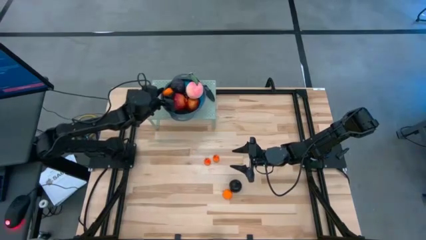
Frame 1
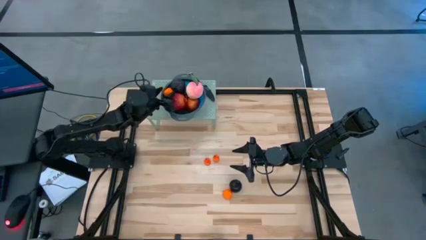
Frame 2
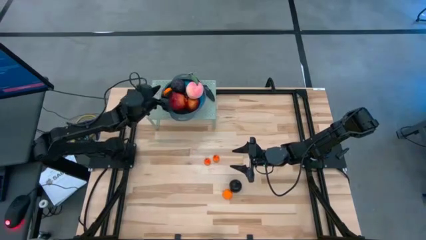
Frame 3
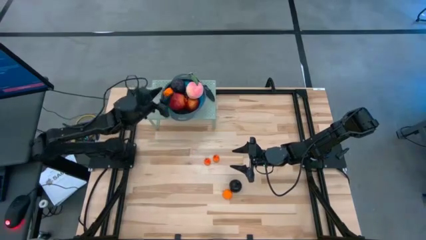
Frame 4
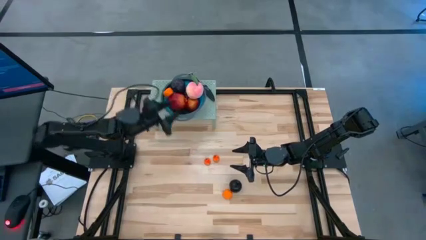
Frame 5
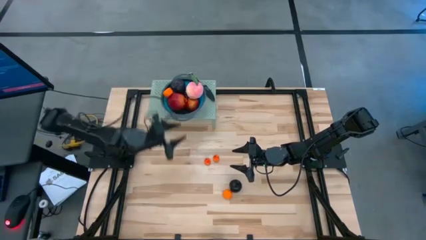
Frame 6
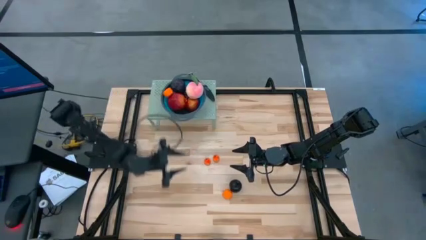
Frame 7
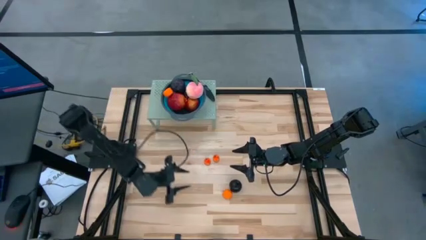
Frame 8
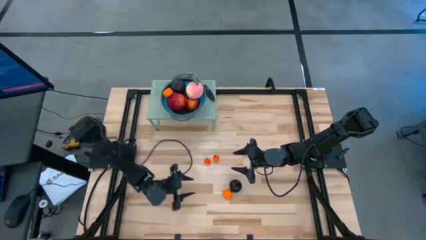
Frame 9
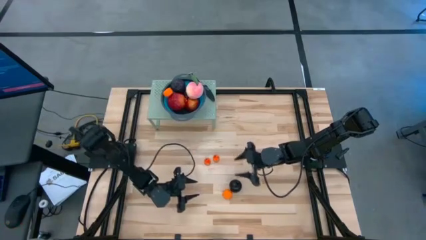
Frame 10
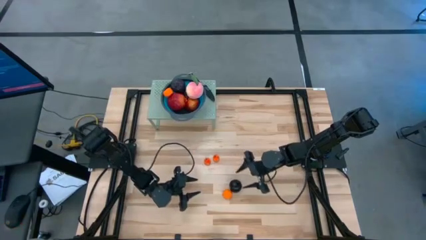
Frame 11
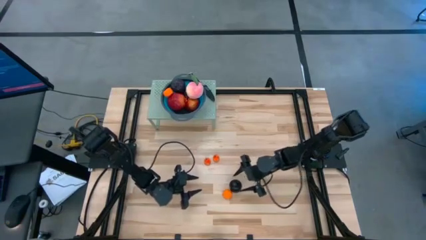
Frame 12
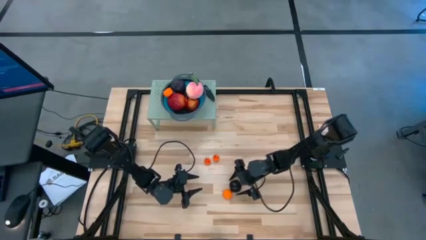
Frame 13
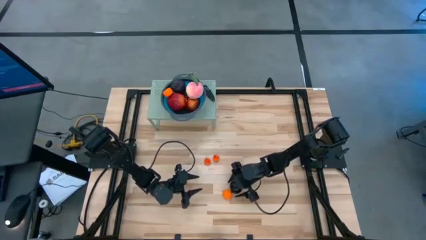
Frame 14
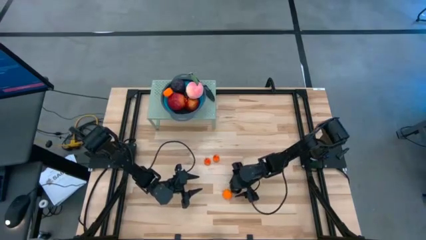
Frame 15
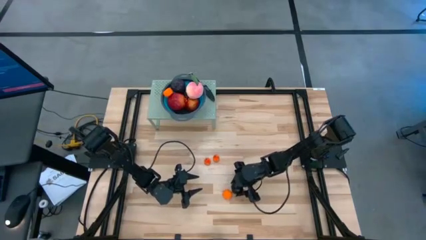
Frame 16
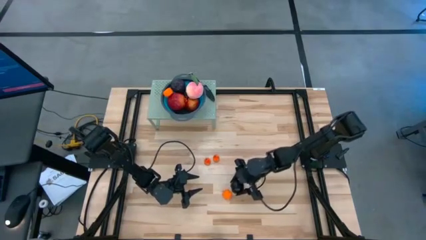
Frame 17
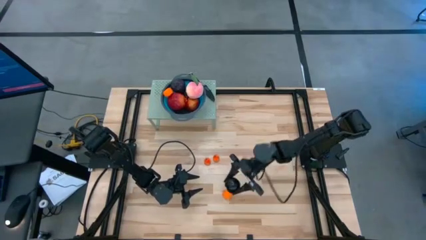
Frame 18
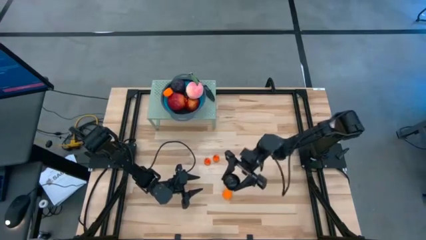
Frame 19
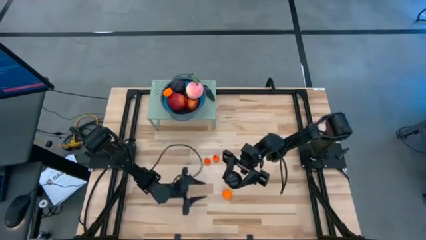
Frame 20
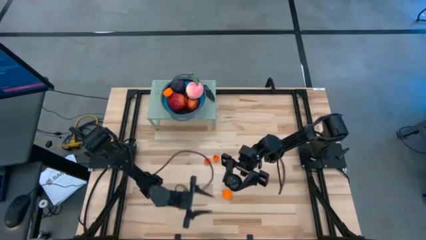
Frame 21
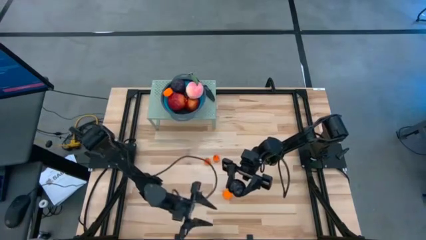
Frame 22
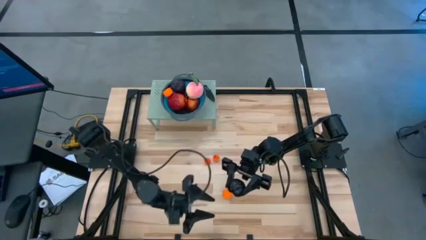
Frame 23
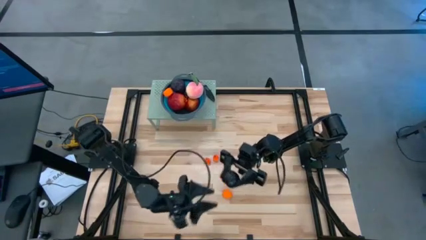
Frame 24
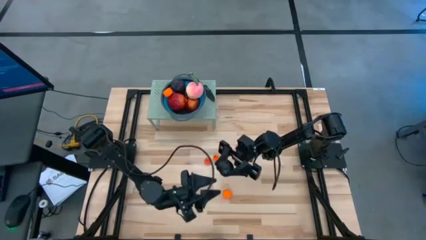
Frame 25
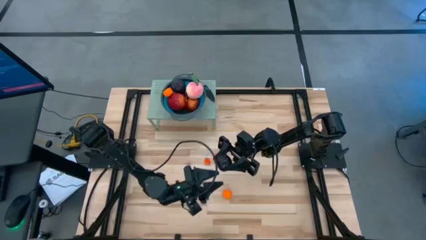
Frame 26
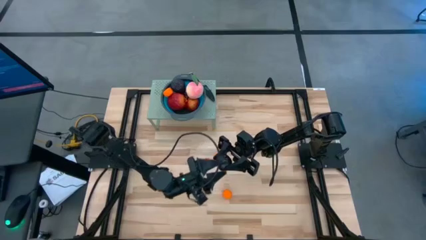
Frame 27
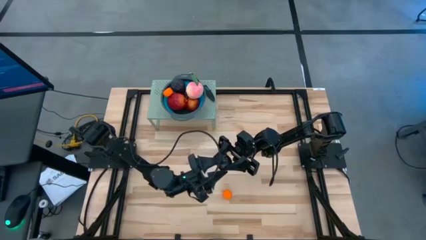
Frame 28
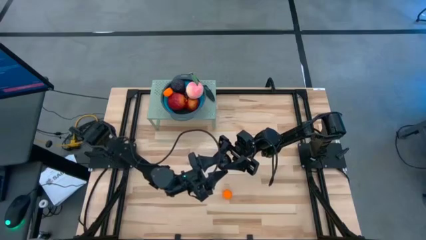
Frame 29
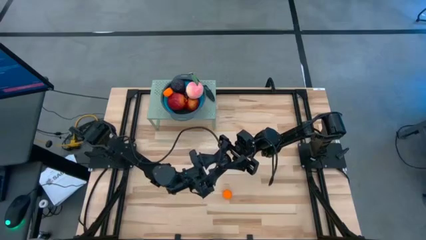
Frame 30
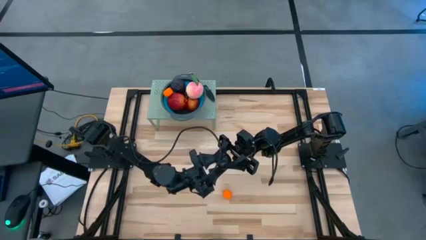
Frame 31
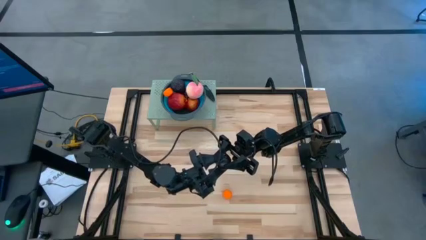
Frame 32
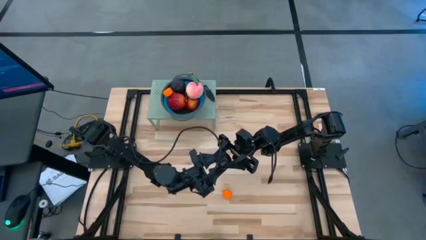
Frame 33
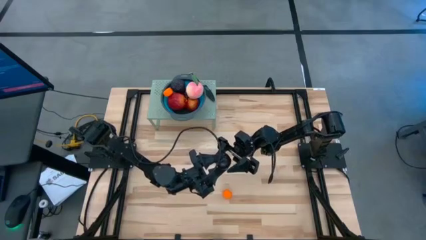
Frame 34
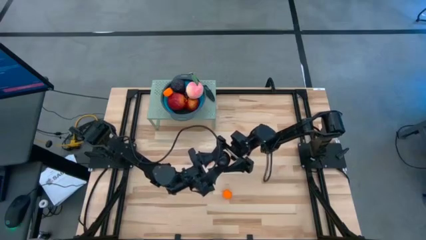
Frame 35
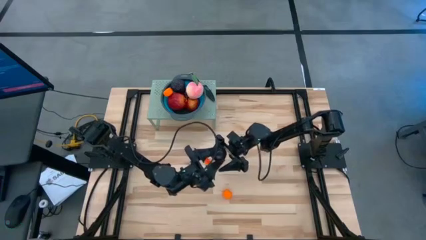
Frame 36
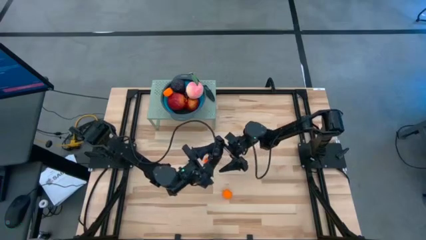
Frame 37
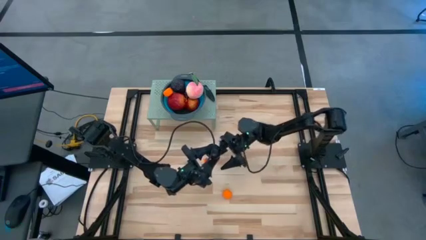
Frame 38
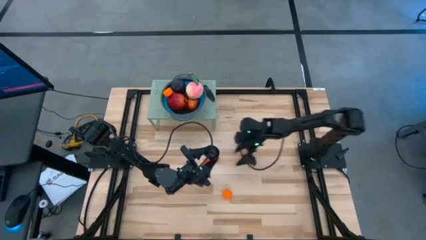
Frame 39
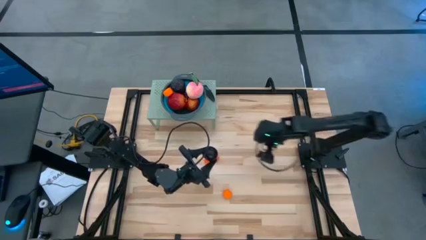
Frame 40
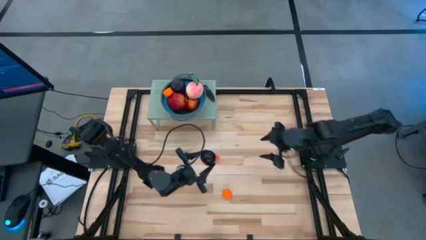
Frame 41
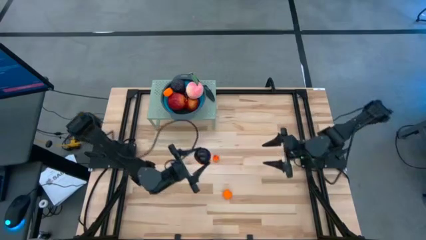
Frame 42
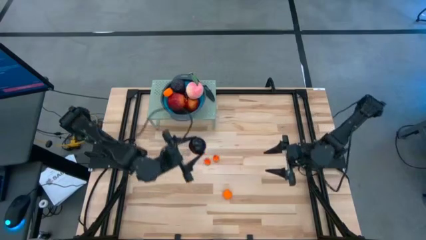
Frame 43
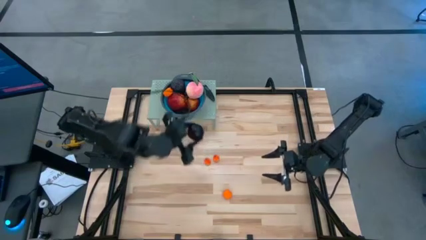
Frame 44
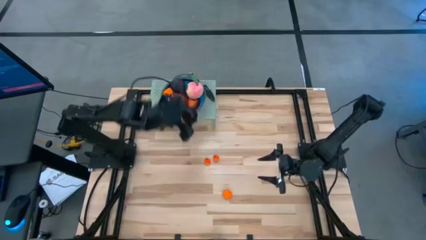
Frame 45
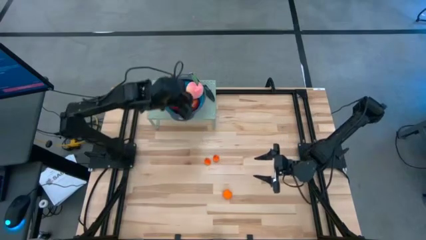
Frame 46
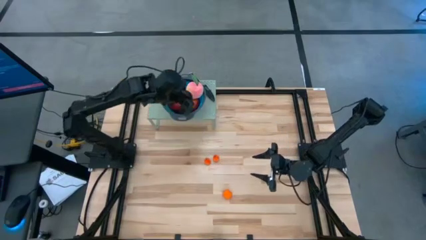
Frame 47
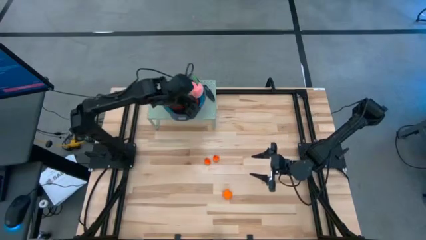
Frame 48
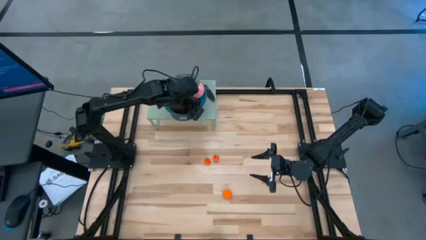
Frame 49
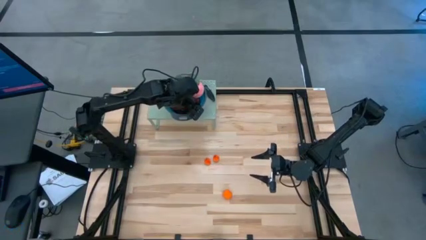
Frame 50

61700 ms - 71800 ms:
Task: Pick & Place Fruit
Put the purple plum into the blue strainer bowl on the shelf

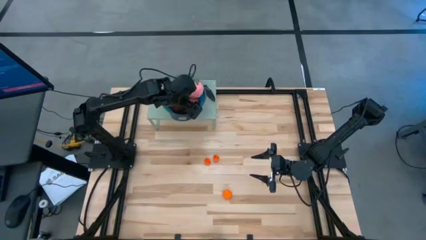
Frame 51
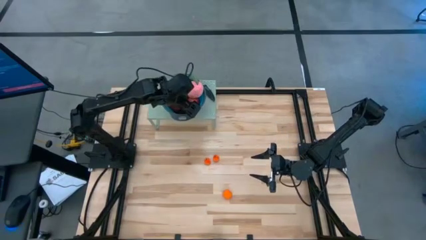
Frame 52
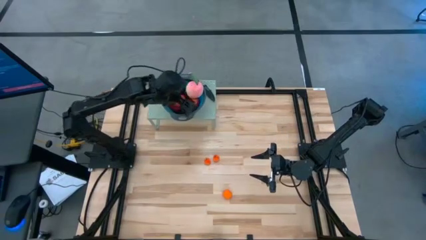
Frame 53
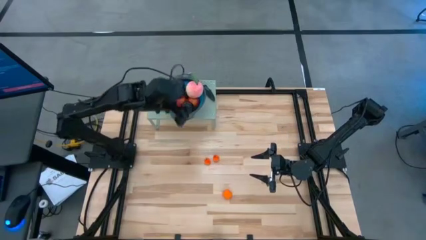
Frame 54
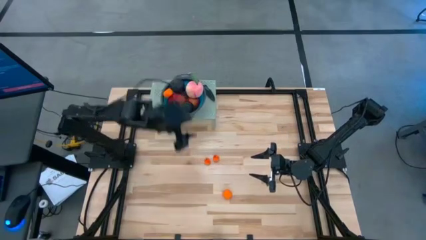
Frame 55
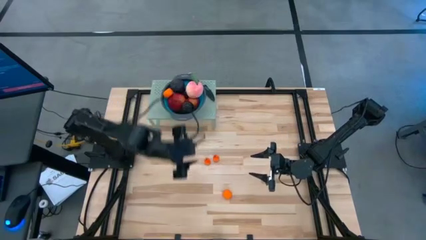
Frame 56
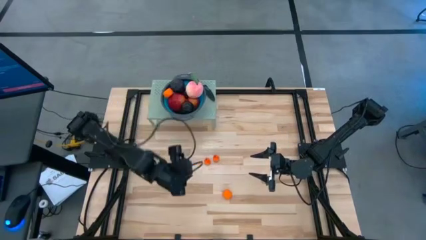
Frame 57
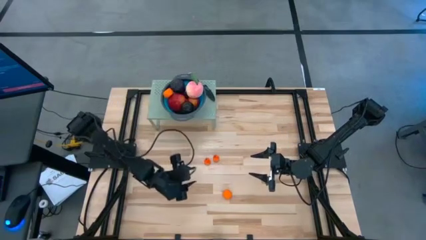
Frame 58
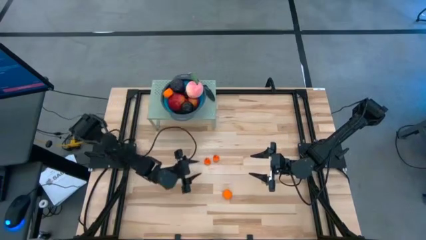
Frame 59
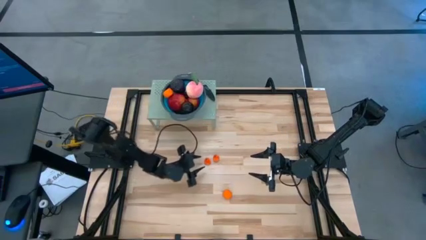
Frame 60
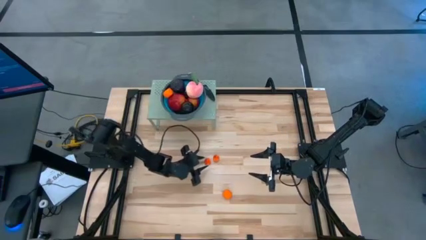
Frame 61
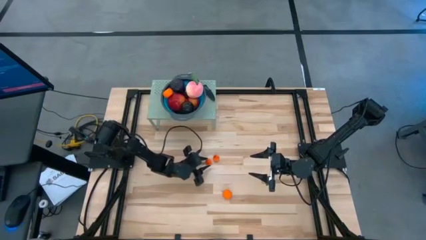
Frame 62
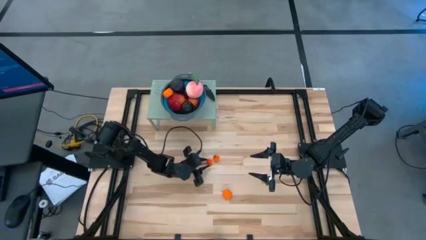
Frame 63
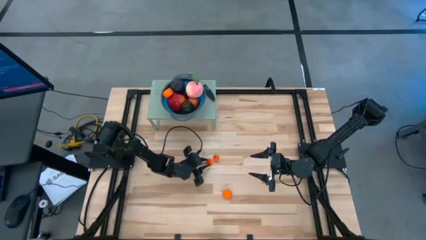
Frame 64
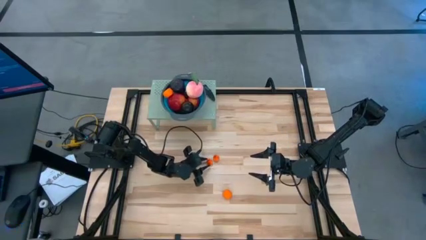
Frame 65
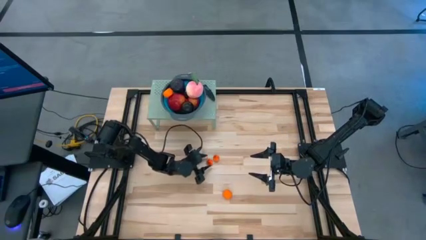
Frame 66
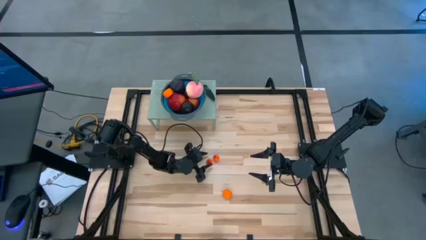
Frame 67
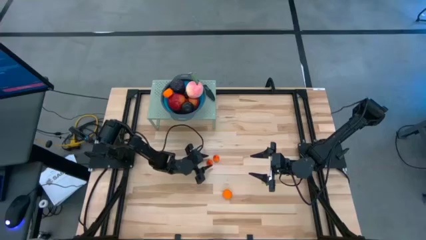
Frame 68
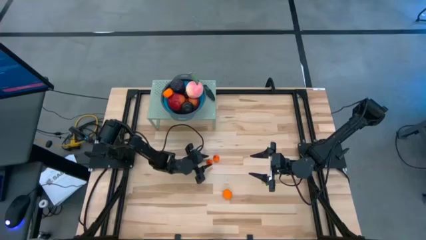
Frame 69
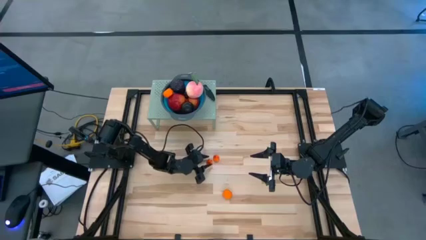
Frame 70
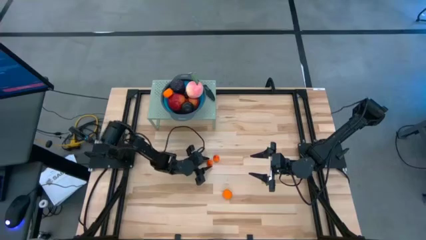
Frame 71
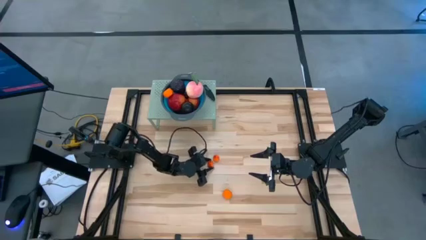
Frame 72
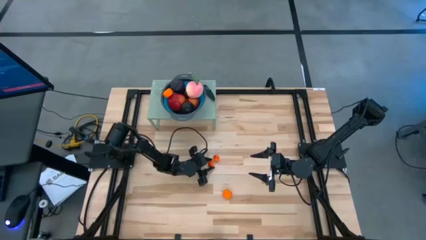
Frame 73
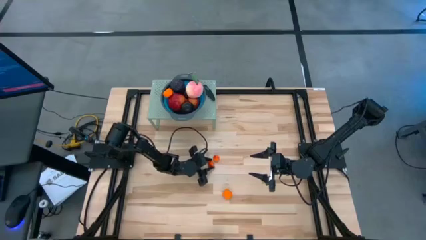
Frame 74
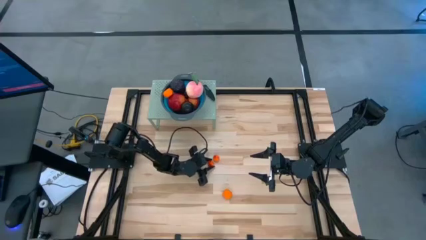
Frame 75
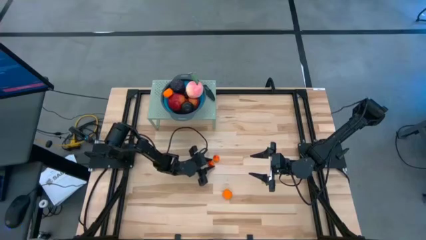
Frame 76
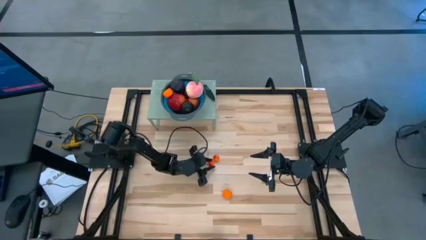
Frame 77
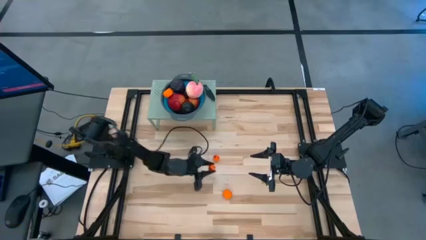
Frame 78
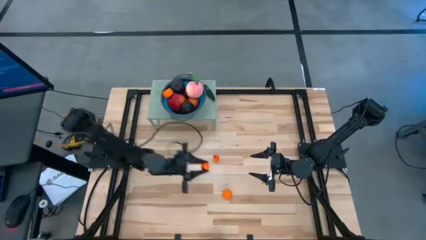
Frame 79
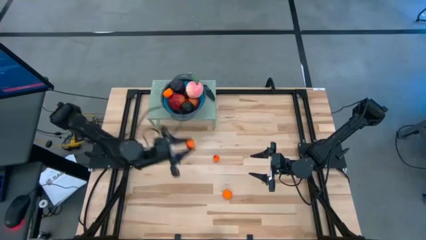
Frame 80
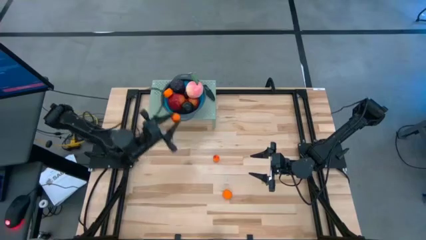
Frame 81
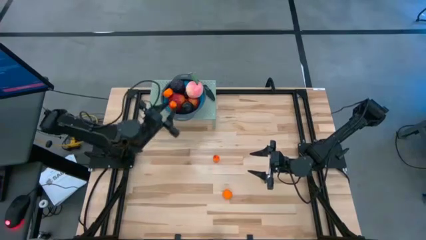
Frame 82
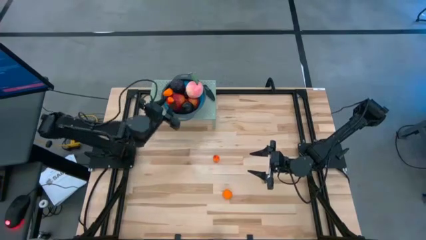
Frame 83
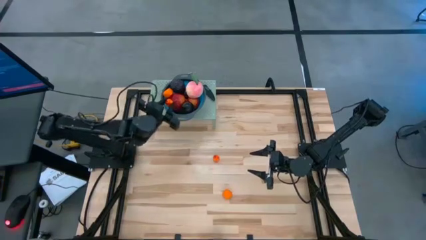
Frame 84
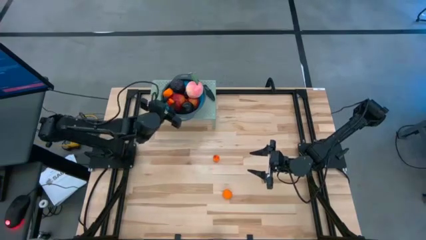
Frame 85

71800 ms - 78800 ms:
Put the left orange pear into the blue strainer bowl on the shelf
